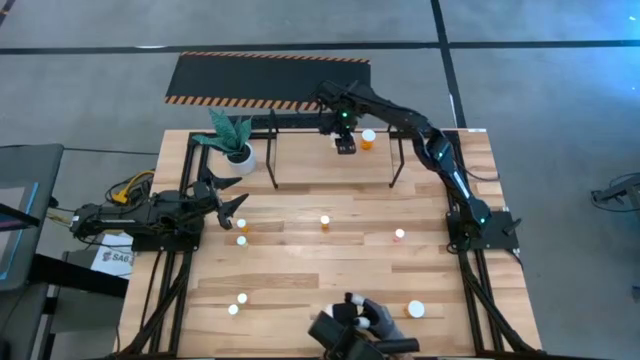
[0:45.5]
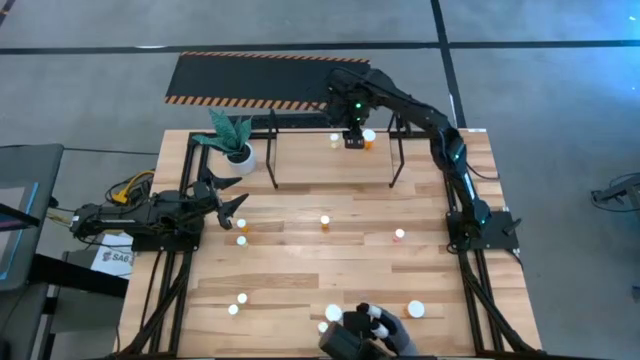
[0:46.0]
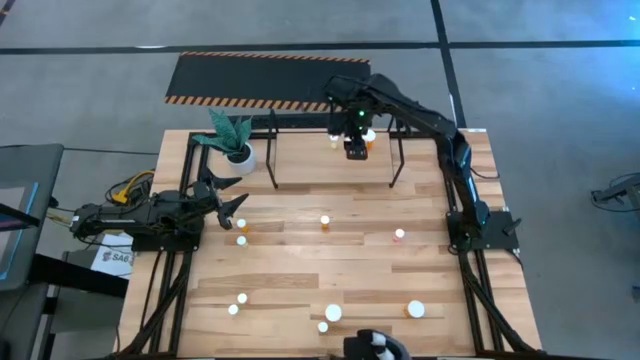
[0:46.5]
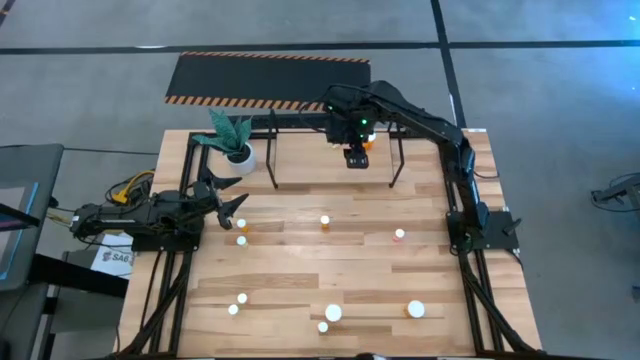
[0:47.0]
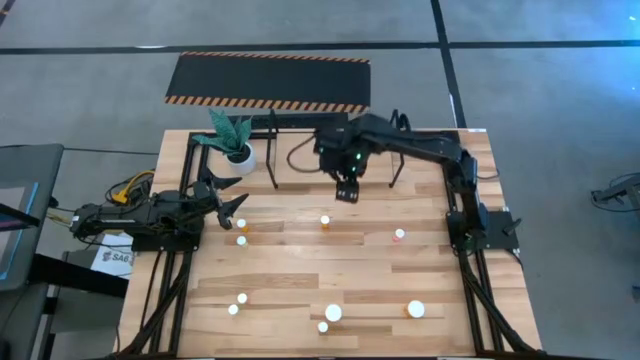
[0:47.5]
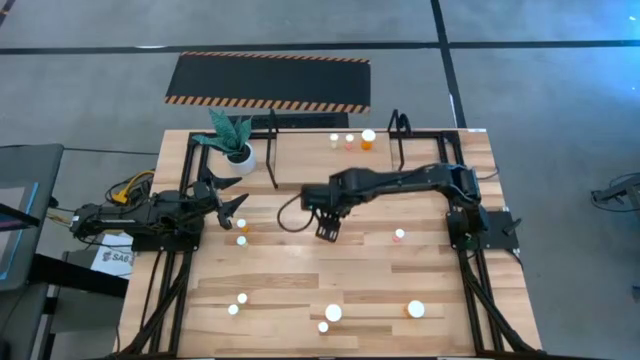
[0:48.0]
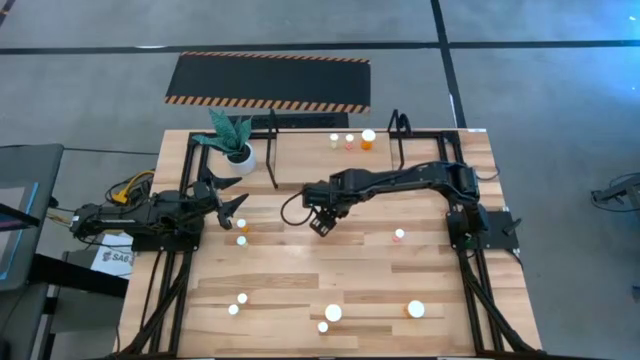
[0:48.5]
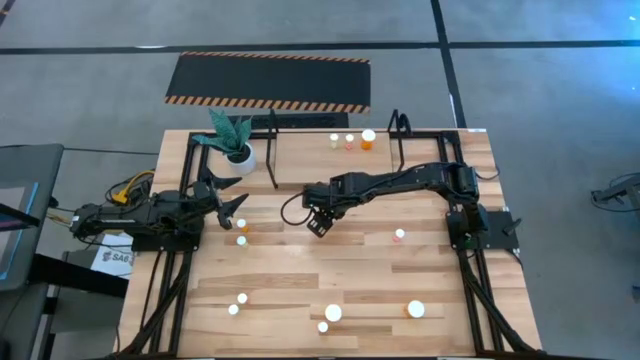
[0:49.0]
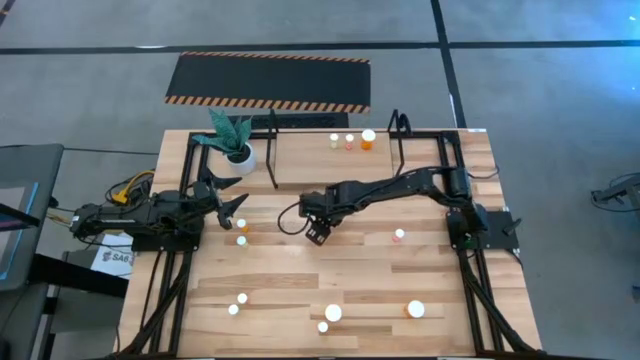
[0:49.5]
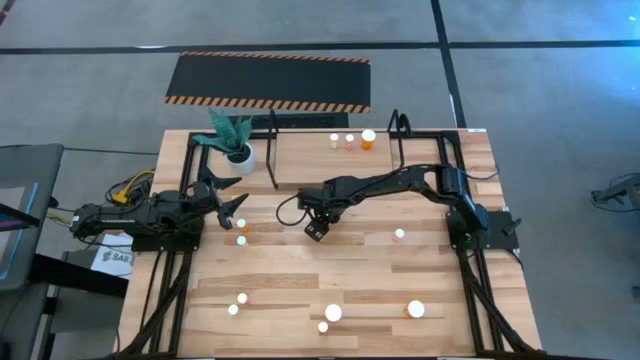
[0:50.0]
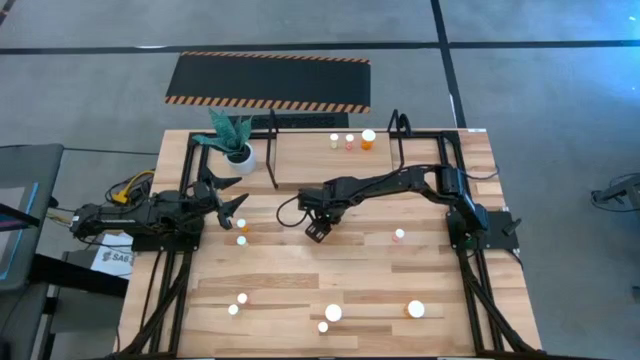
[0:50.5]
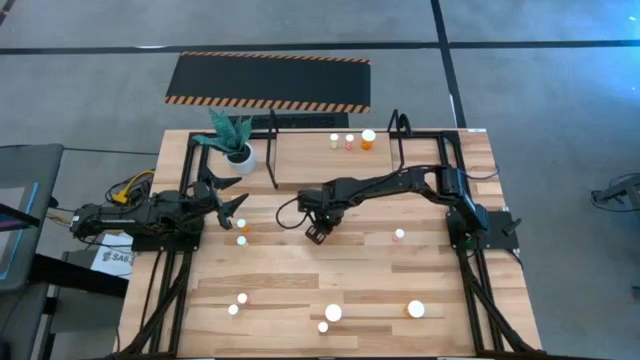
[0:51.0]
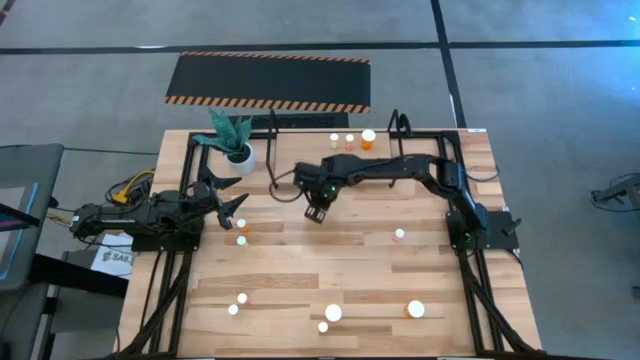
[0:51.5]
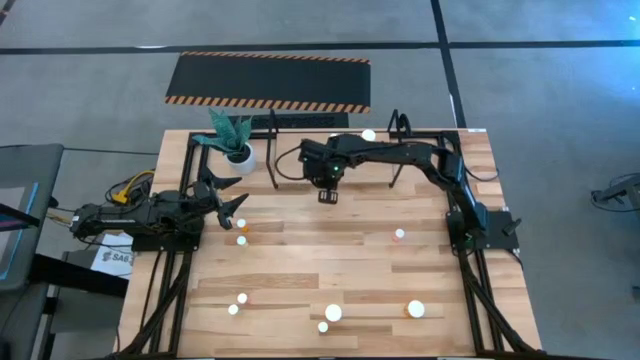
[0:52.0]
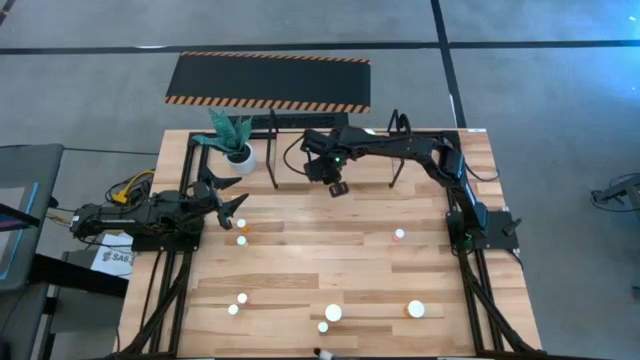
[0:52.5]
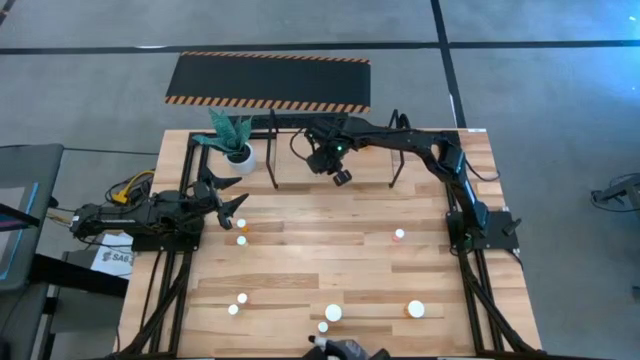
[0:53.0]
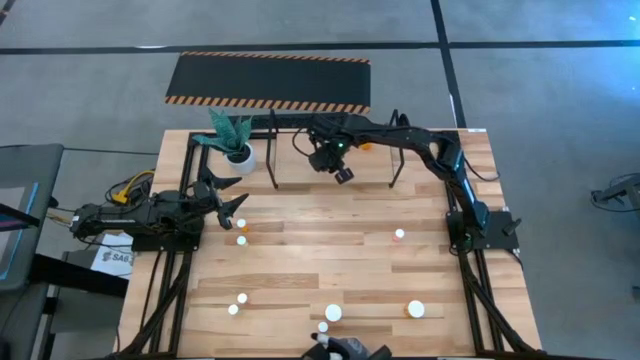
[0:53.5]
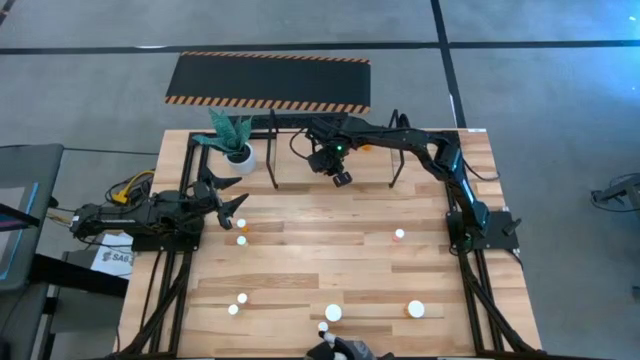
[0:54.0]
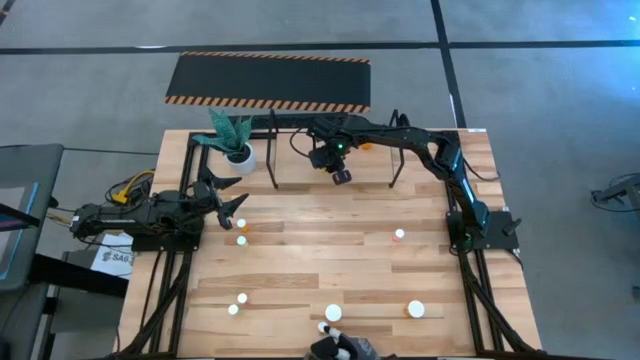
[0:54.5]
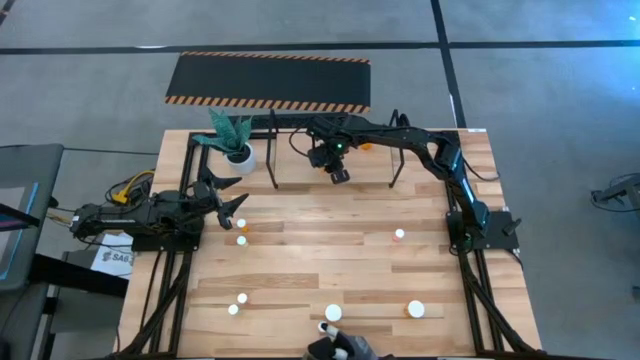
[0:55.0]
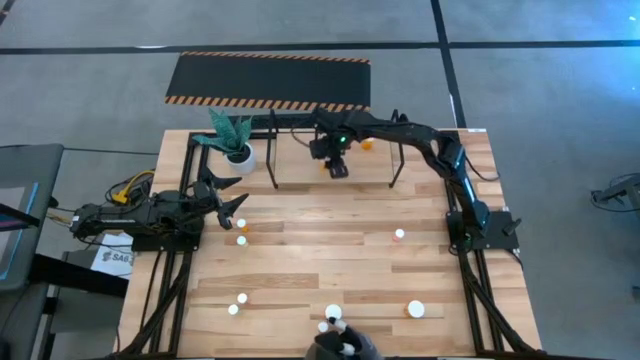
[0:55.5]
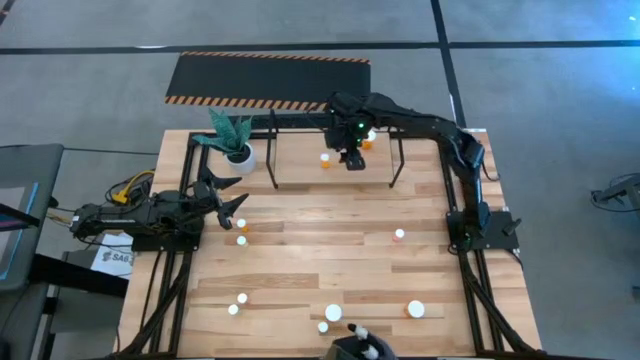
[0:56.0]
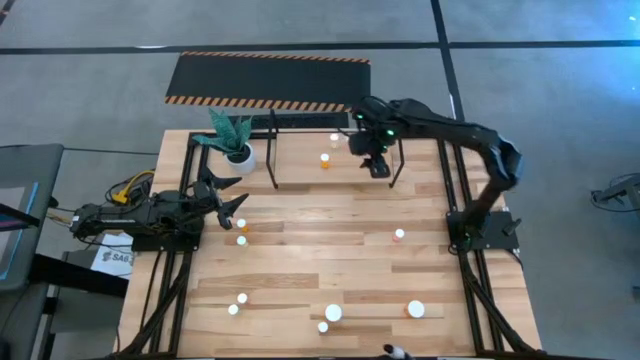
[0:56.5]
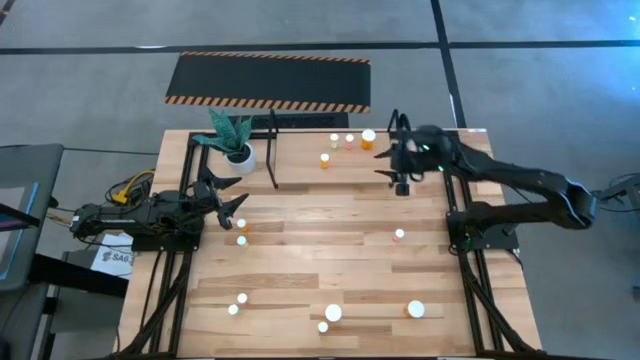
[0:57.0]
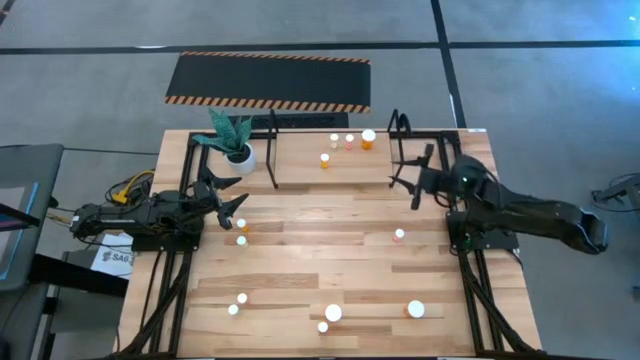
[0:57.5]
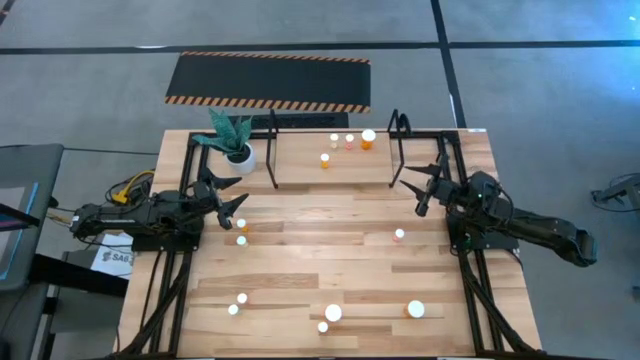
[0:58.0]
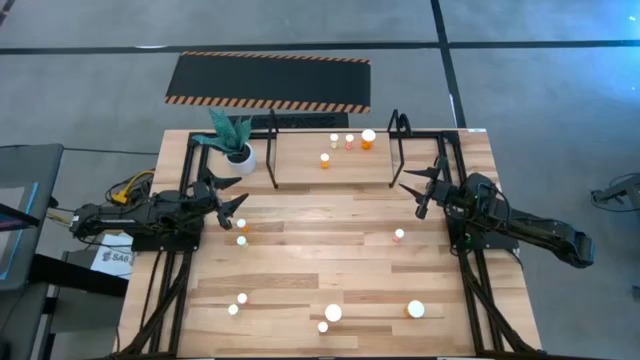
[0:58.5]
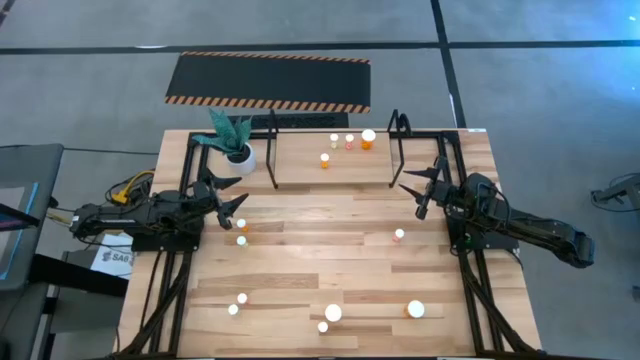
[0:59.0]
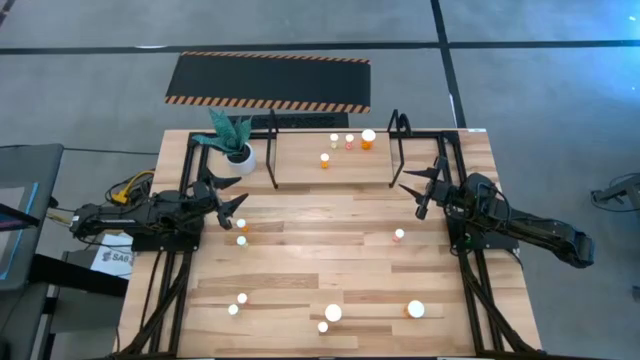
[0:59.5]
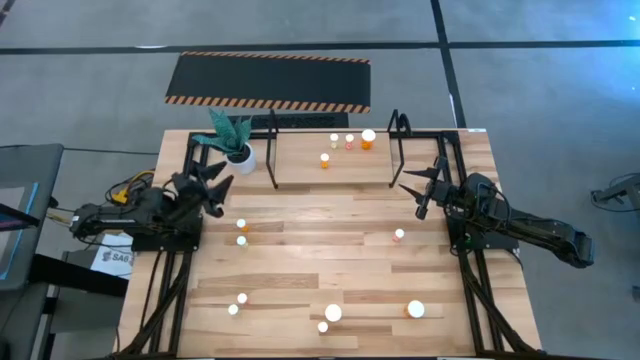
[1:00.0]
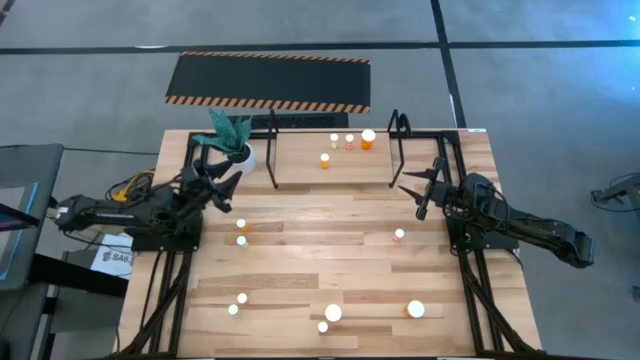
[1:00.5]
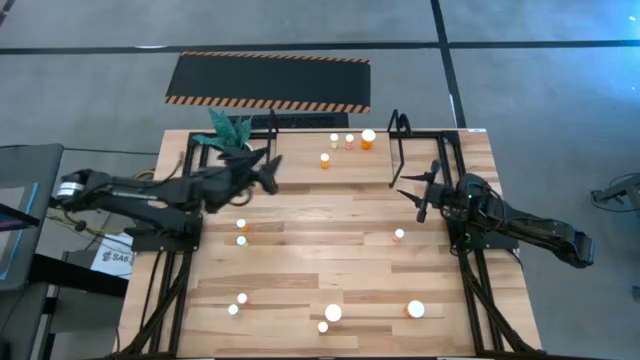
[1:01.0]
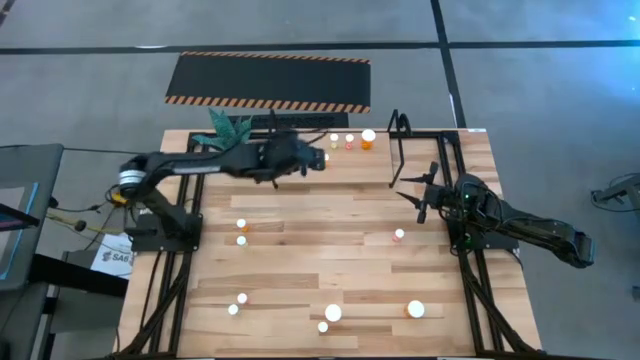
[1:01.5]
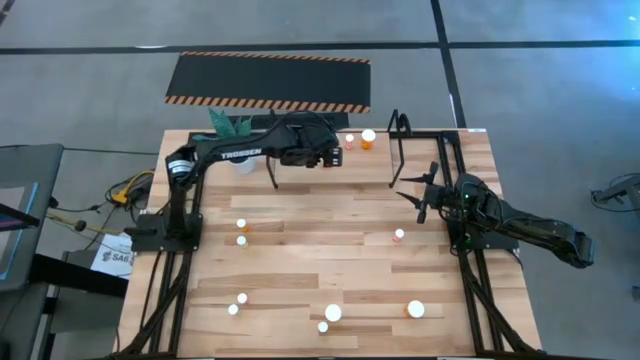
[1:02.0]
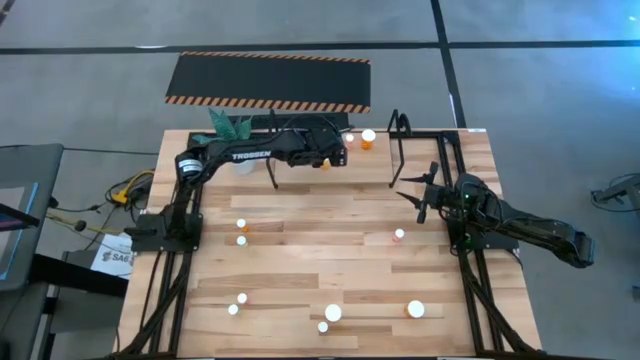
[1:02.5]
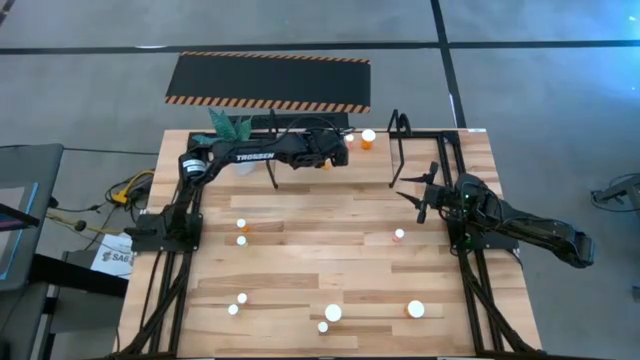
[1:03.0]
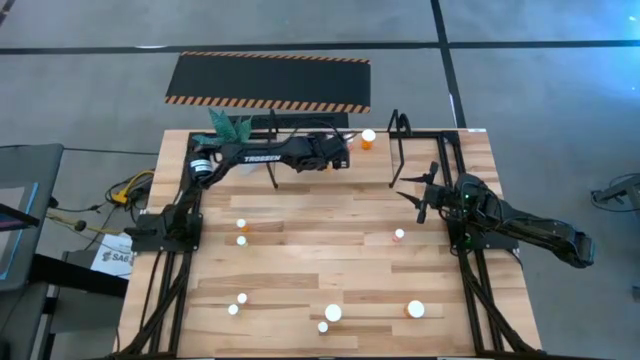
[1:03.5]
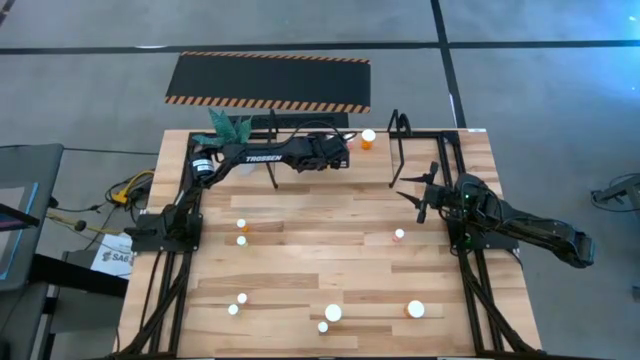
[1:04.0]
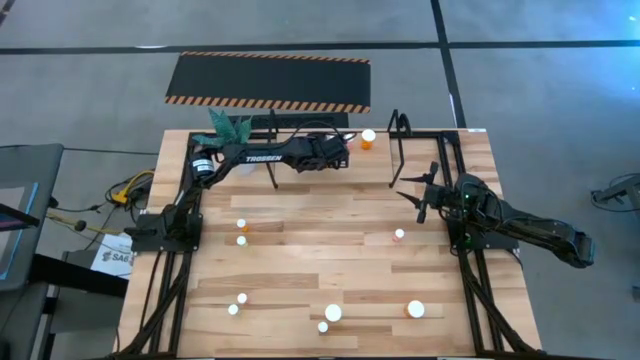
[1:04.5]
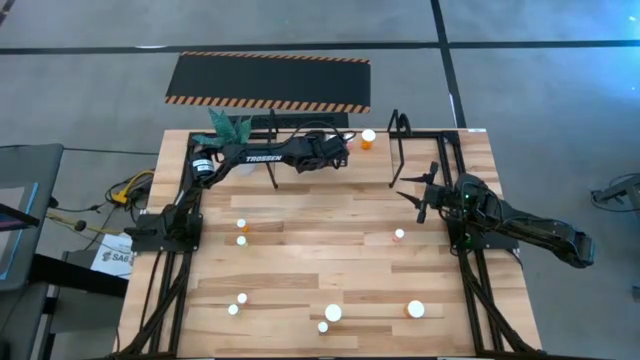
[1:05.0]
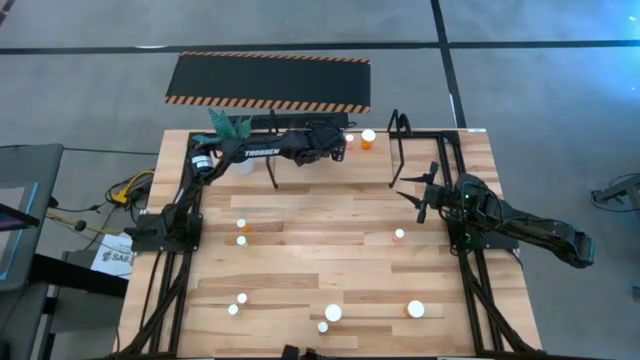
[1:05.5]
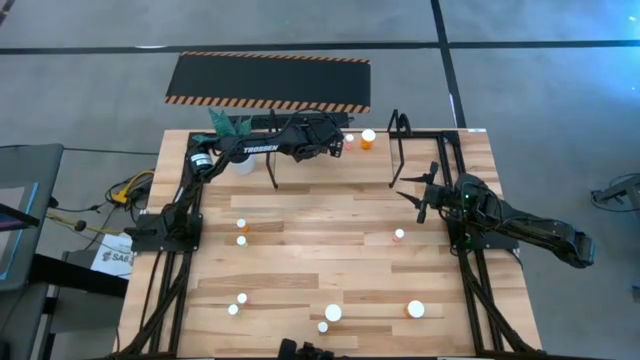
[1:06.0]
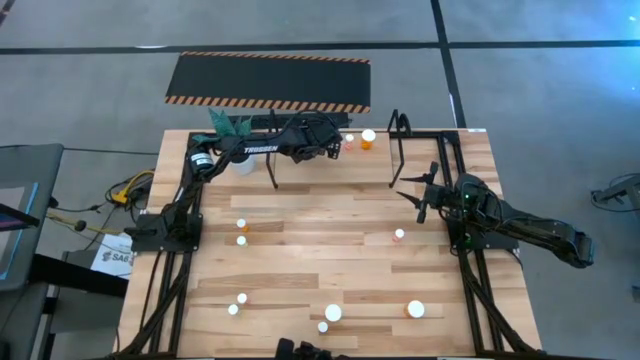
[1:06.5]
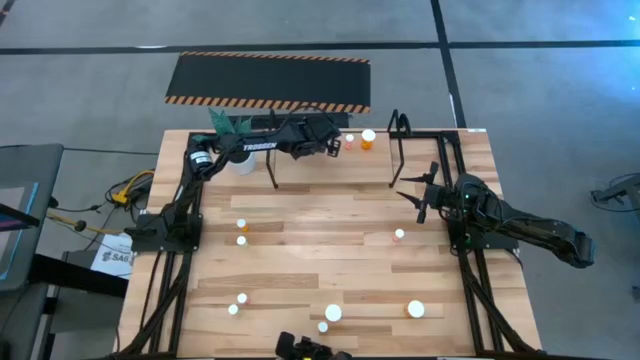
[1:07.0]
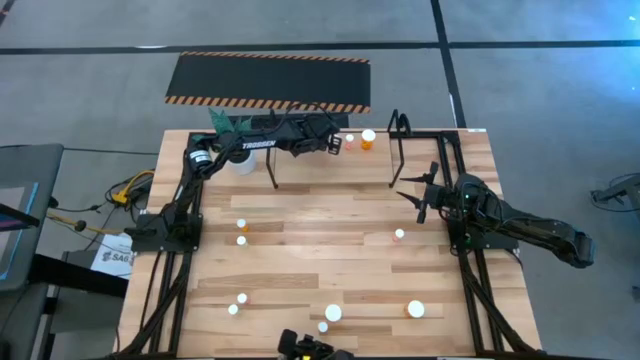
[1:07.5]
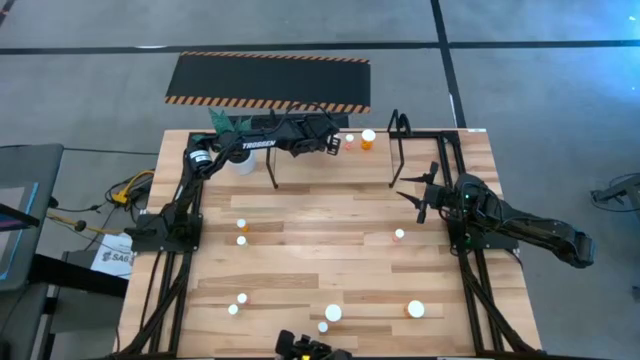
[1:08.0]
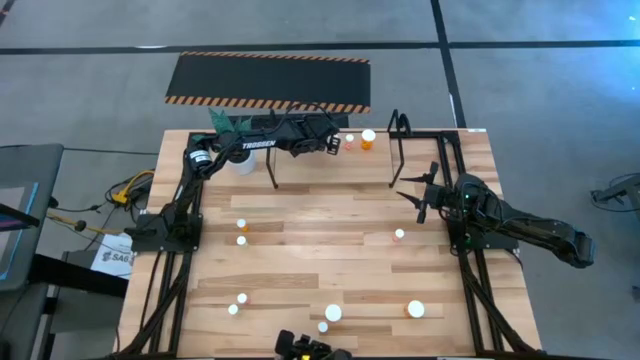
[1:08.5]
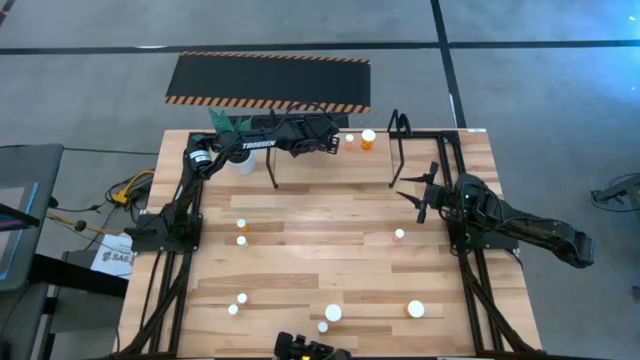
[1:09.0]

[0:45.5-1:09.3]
Task: Pick and place medicine bottles onto shelf by color
Put the top right small orange pill bottle on the shelf
